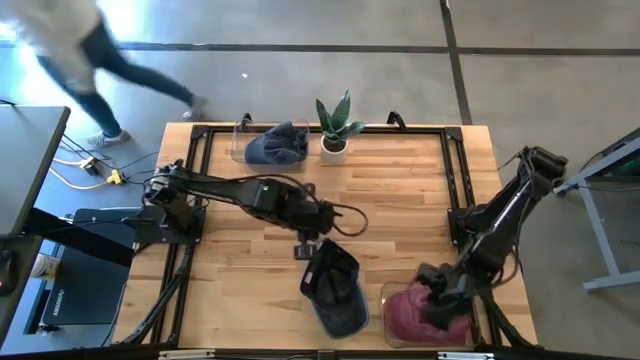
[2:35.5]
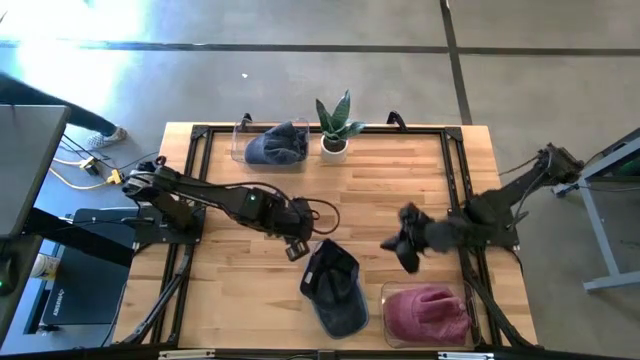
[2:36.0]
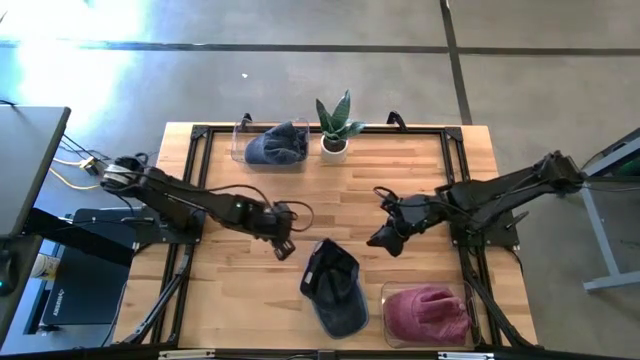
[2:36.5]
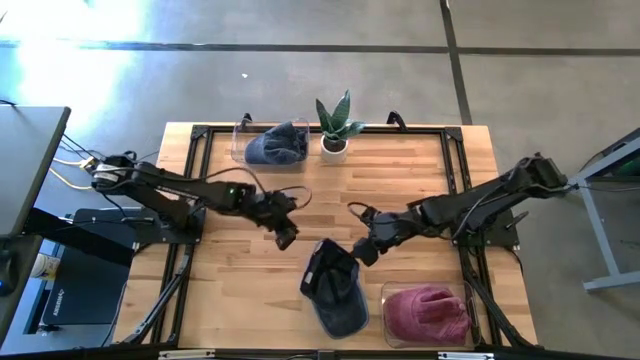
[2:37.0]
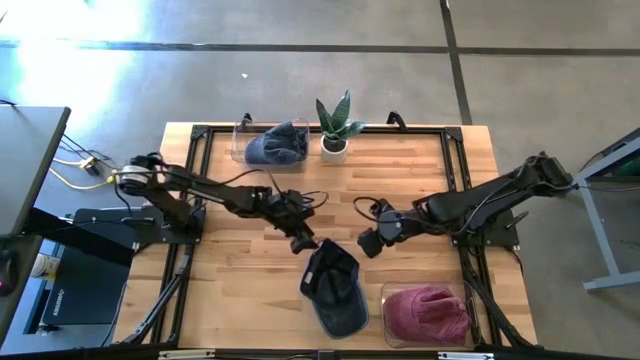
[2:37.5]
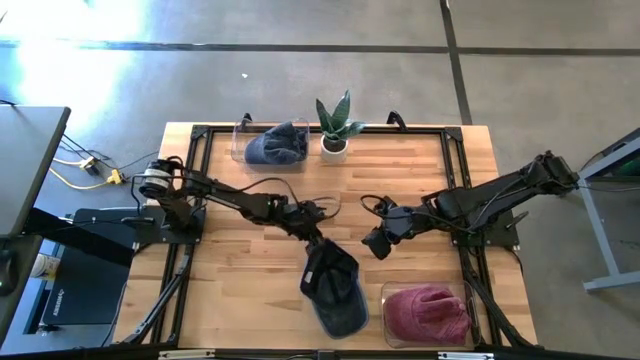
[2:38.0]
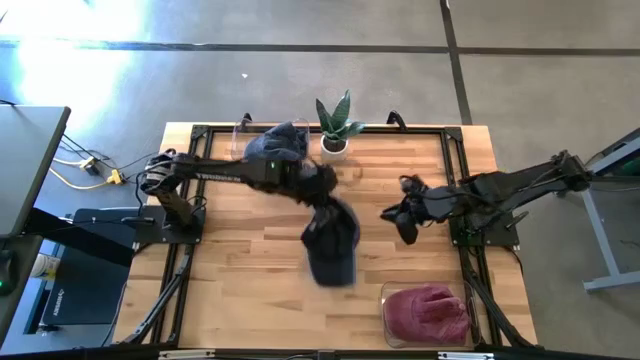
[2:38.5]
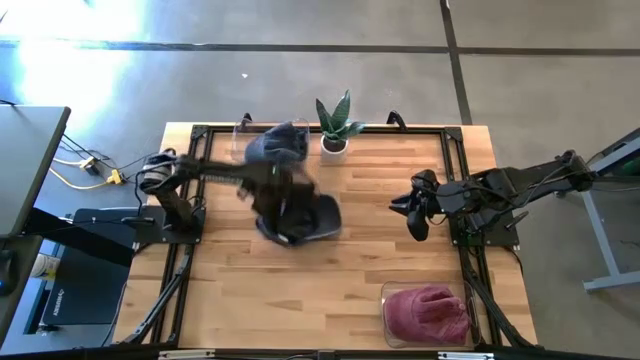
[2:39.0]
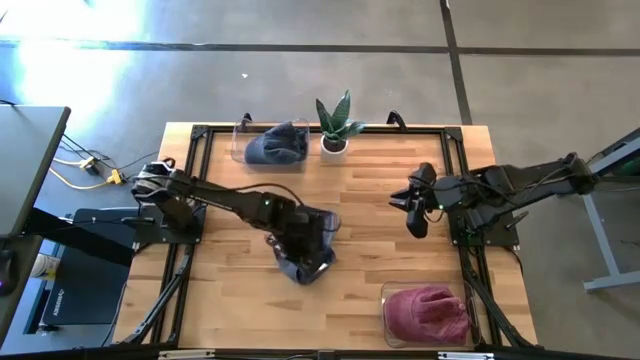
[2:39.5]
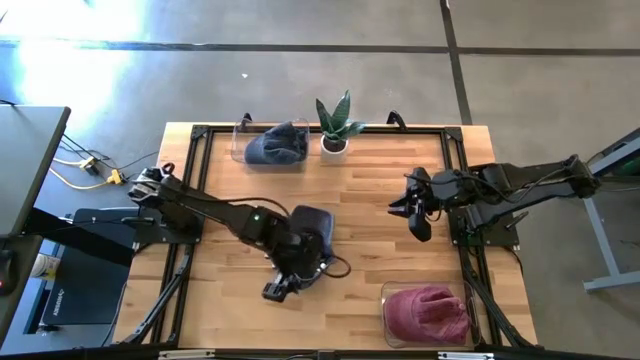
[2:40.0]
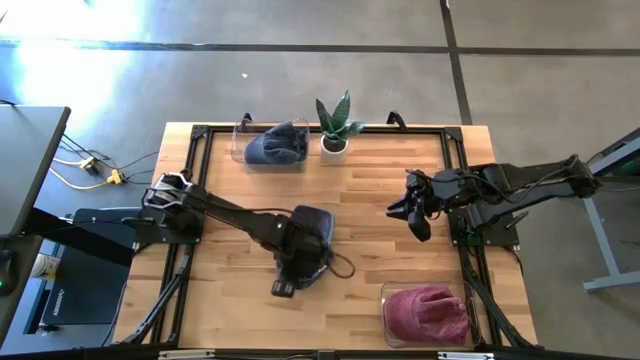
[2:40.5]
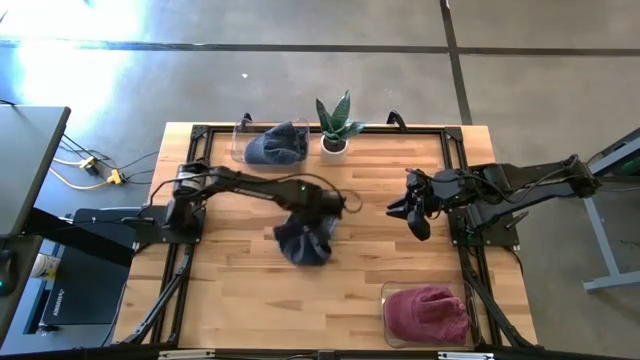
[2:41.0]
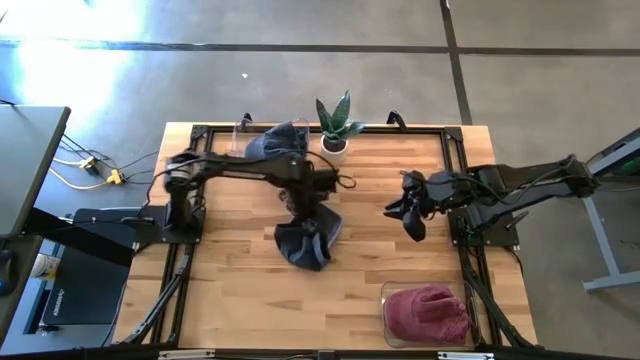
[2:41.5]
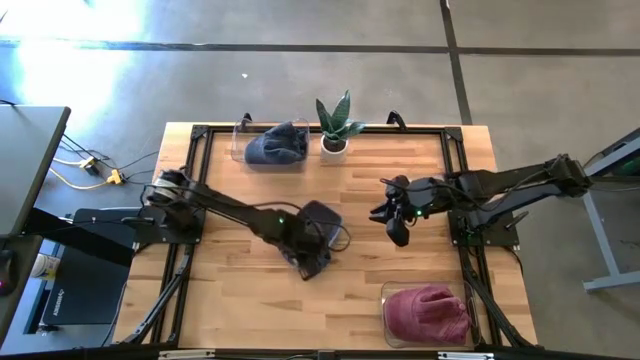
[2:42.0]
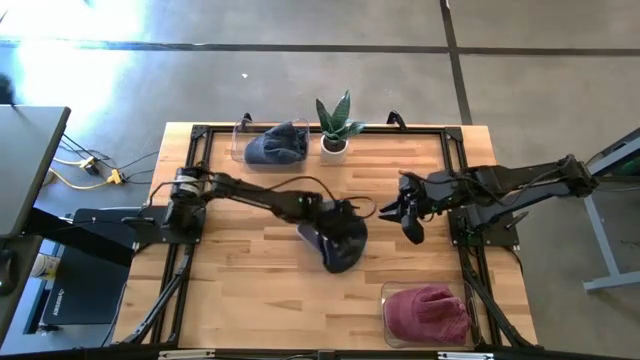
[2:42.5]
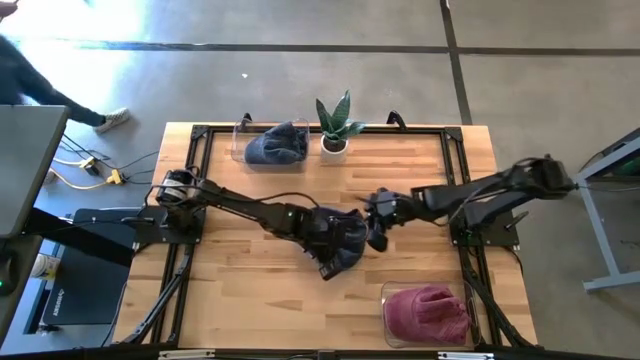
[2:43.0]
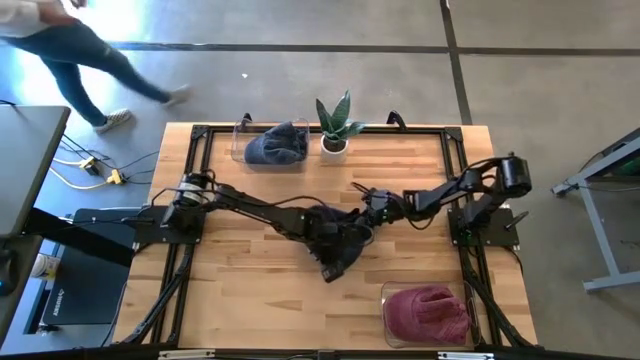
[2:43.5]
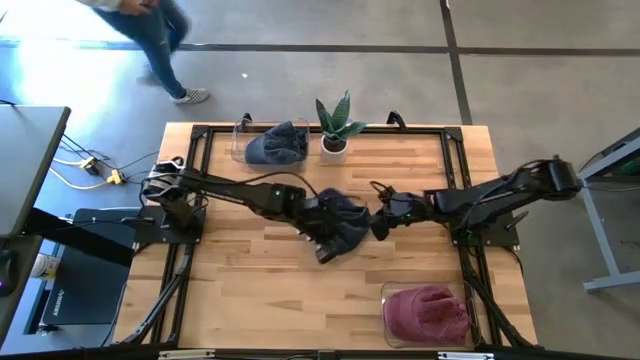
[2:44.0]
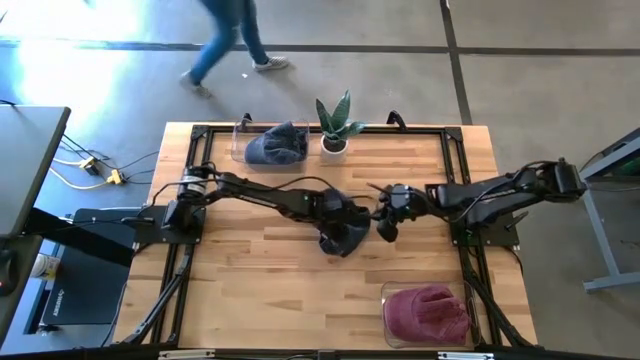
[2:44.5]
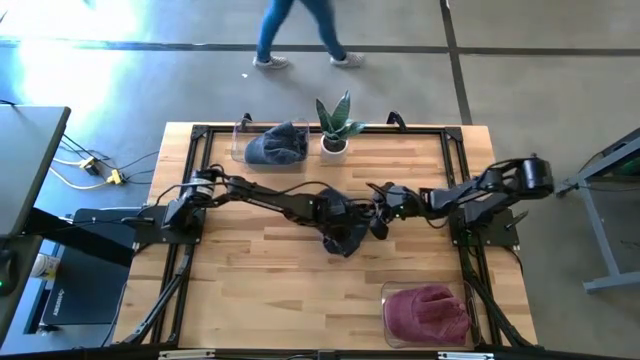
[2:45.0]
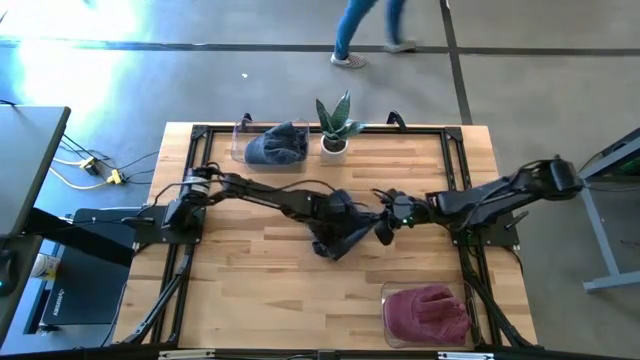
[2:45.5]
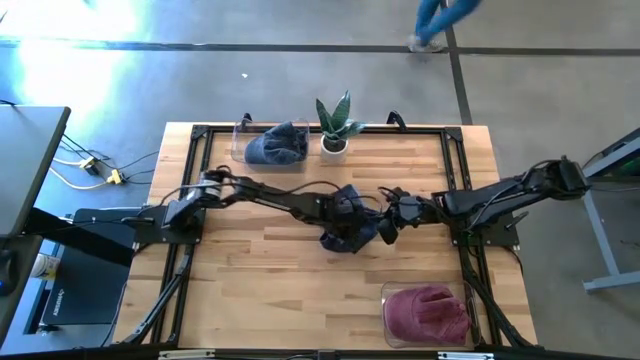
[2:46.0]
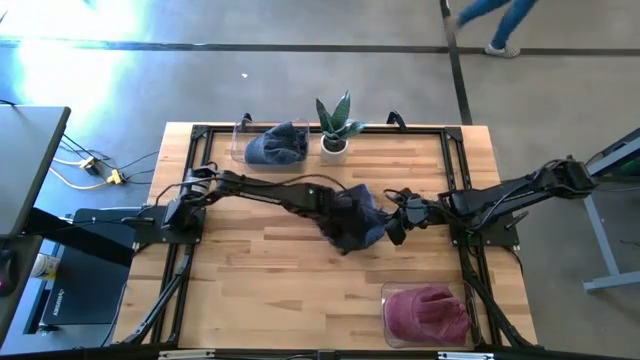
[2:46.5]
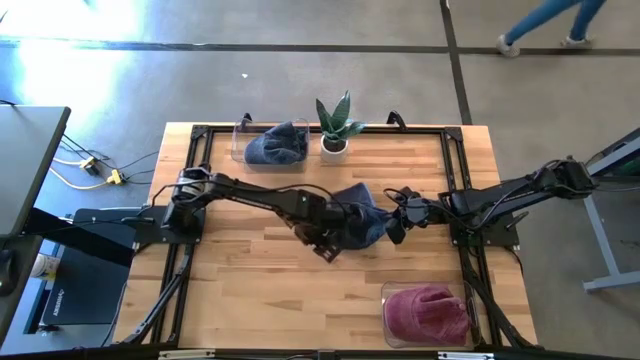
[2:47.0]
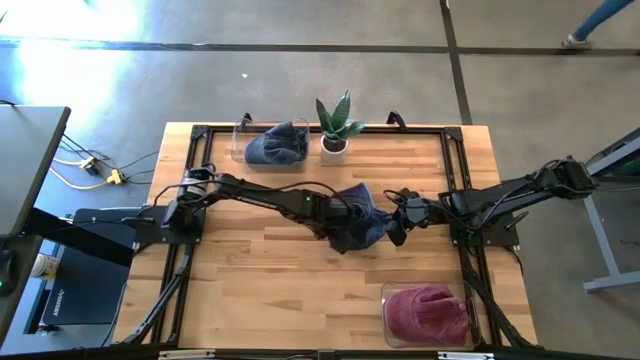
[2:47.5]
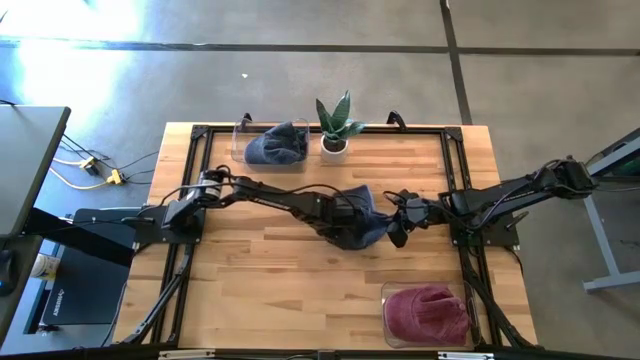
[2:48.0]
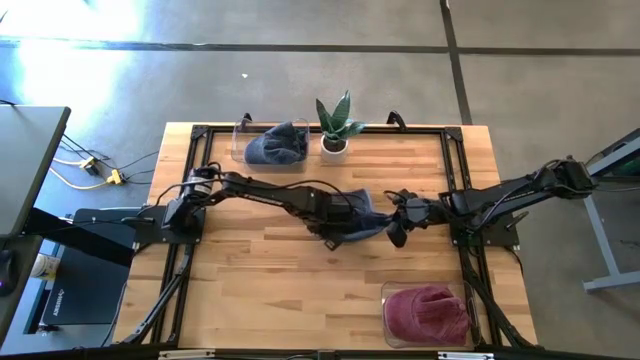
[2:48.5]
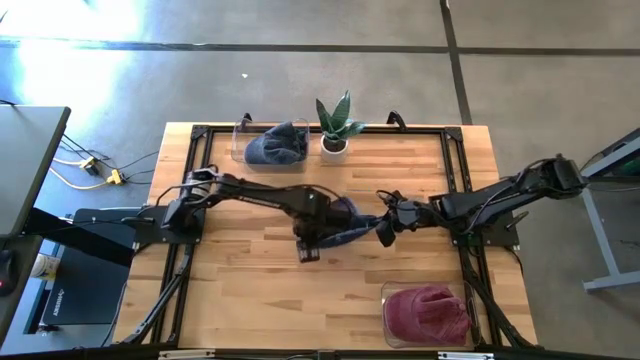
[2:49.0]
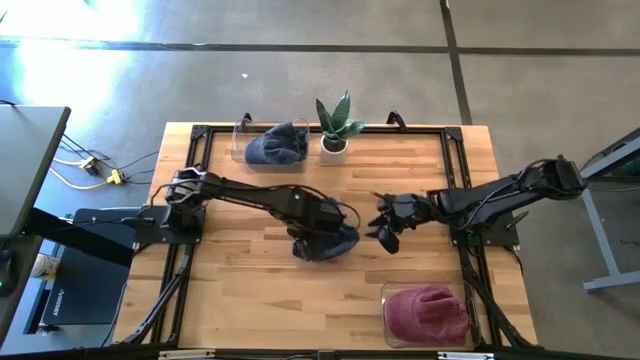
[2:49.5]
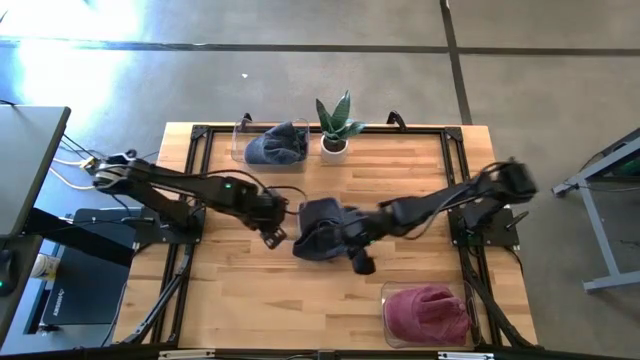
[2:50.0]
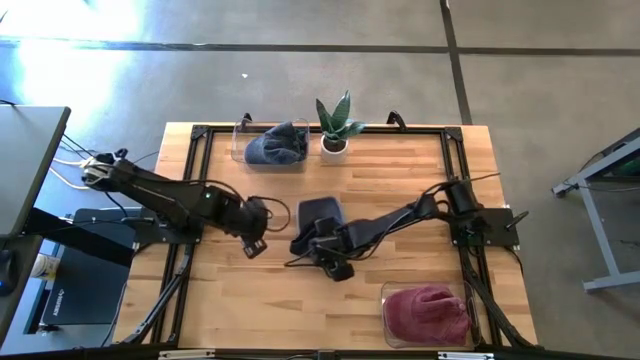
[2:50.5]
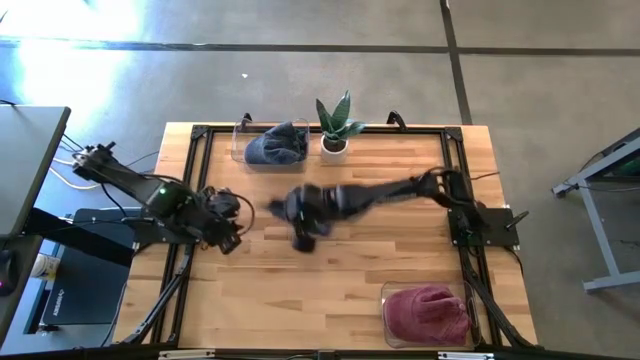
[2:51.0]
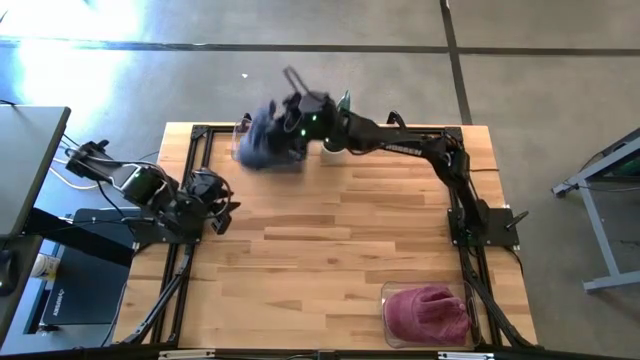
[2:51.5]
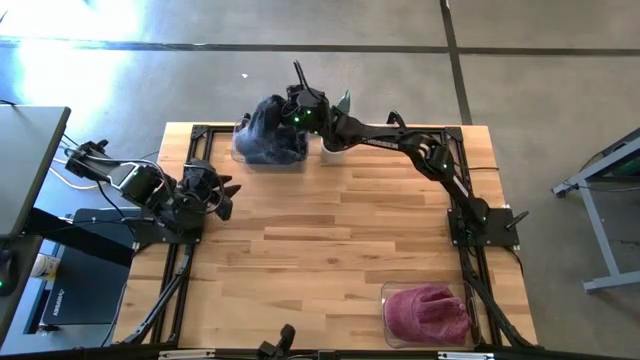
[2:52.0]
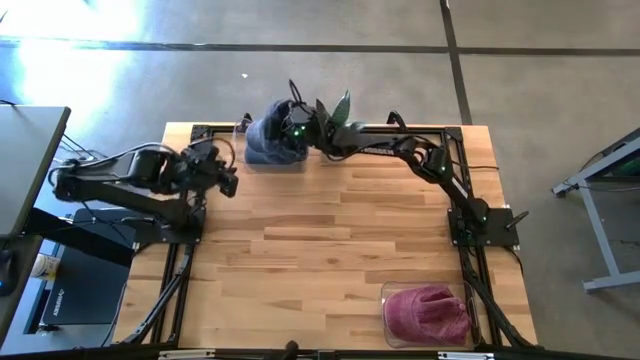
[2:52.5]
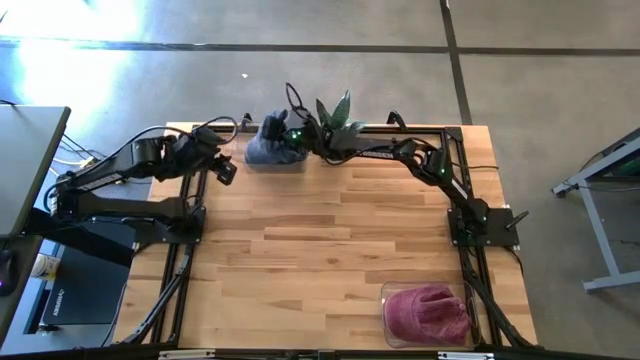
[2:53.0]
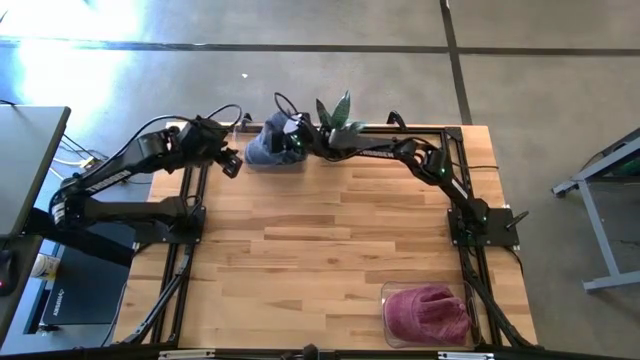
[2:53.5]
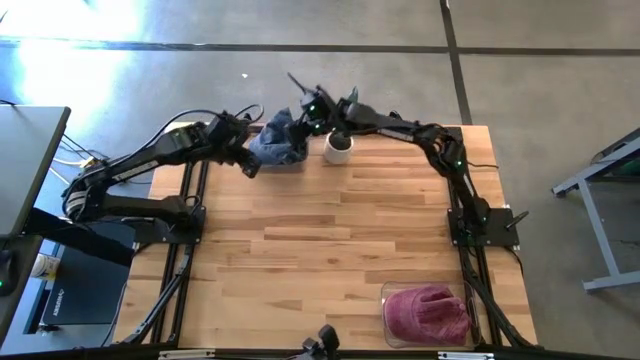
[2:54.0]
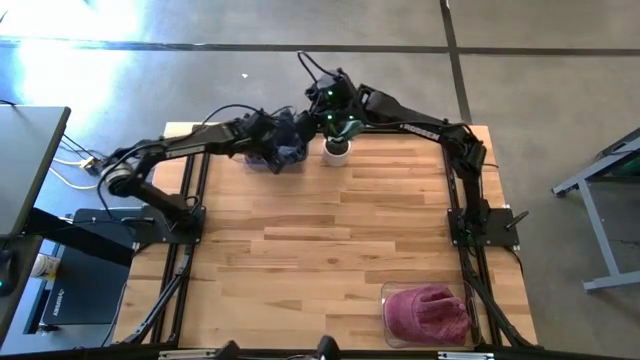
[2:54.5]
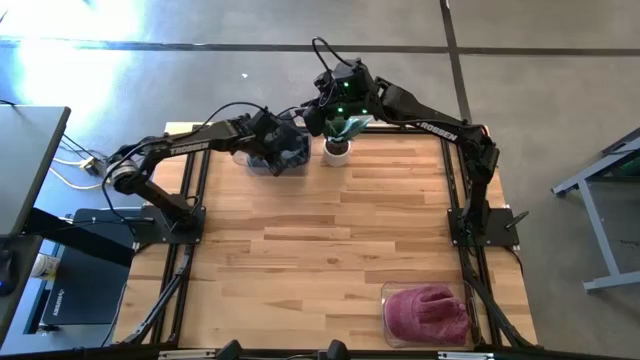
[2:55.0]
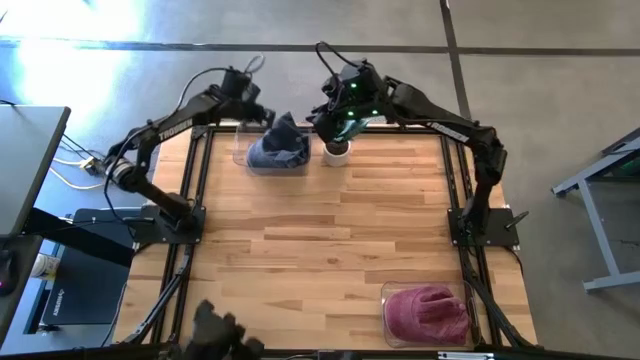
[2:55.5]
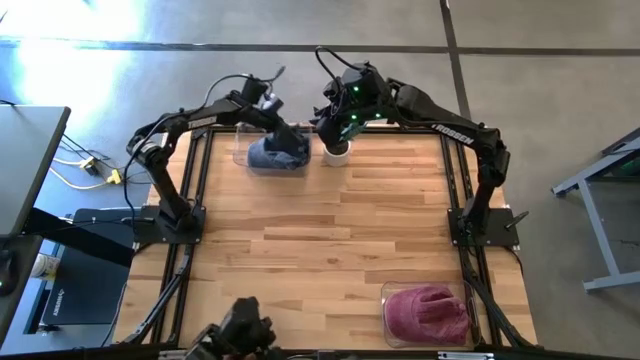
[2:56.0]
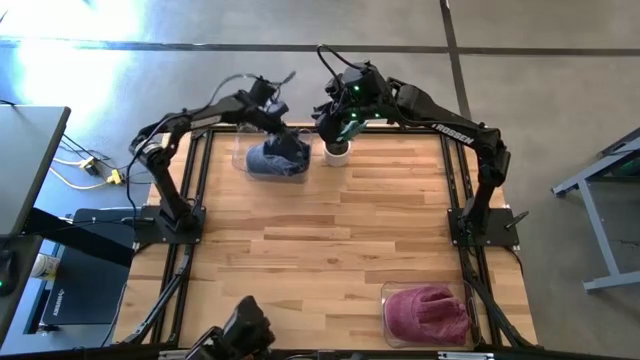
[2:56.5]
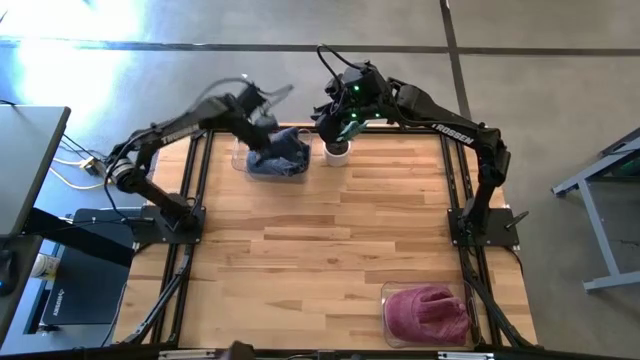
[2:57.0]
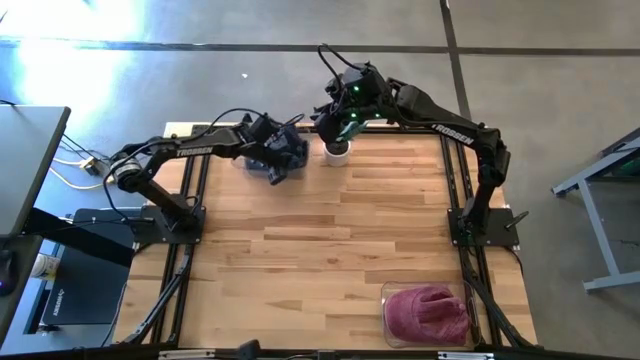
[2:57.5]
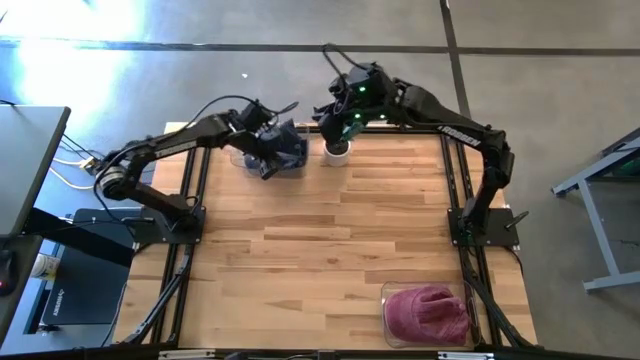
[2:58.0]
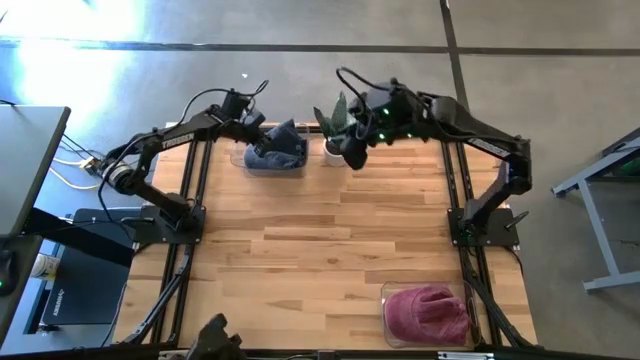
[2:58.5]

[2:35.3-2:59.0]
Task: Pick & Place hat
Put the blue cap into the top transparent bin
